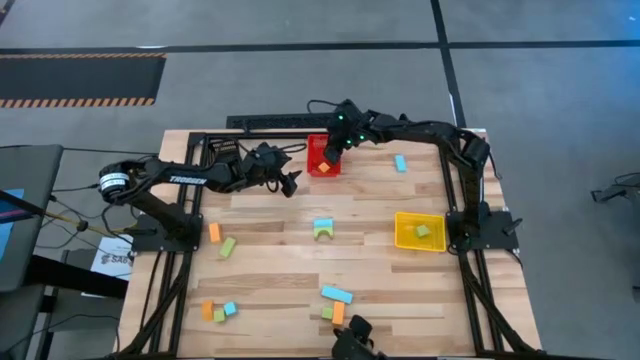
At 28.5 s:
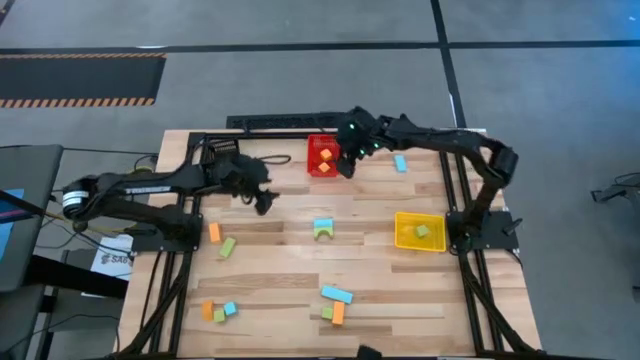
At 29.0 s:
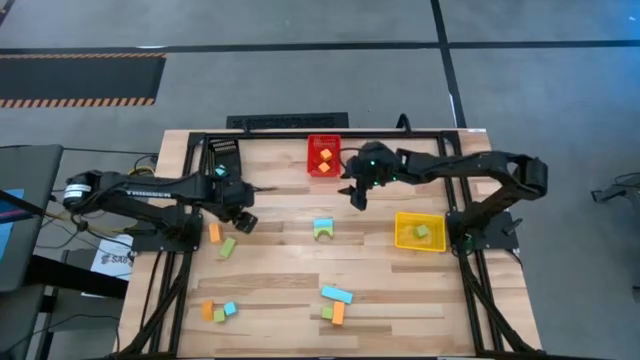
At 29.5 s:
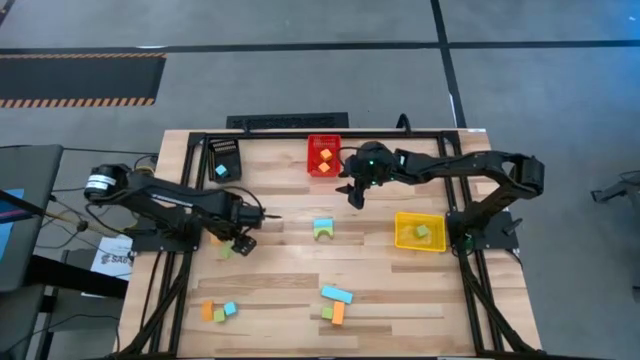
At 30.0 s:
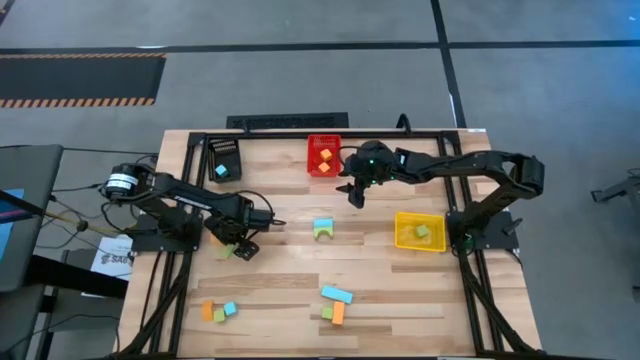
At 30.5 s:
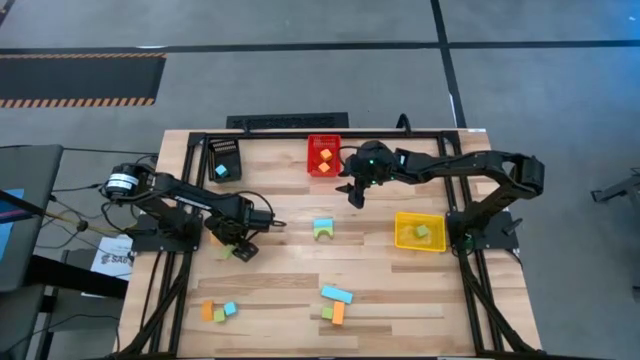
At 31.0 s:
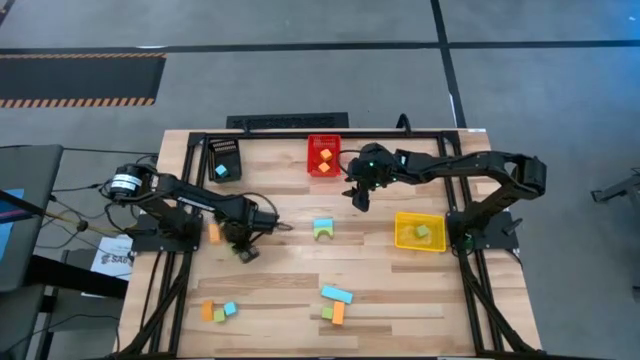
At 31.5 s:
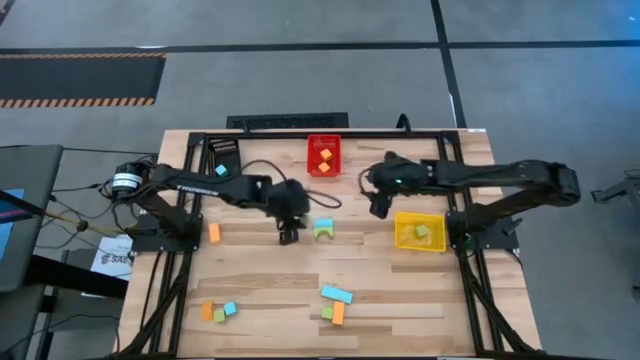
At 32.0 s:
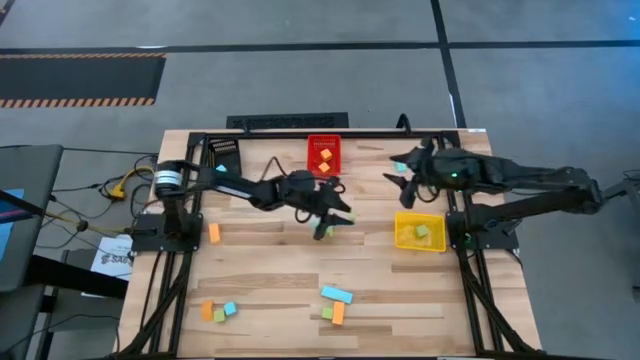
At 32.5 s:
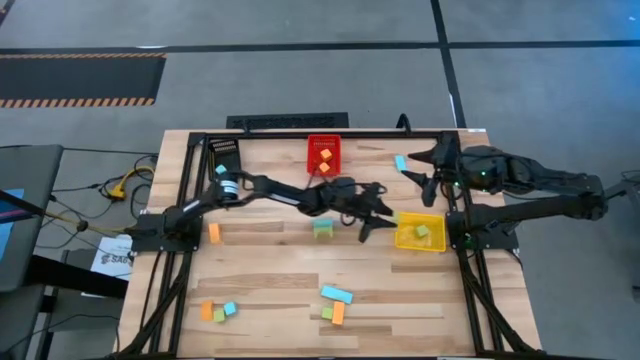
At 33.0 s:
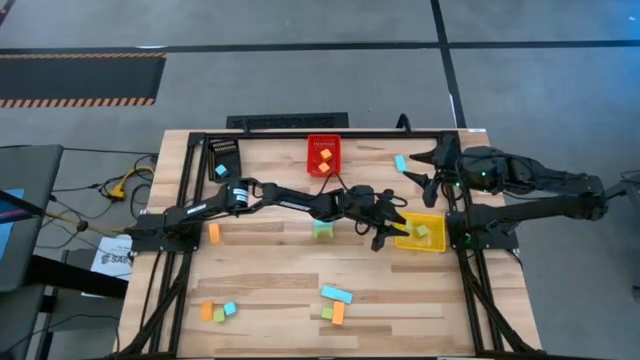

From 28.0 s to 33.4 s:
Task: Sort & place blocks by color
Put the green block into the yellow bin

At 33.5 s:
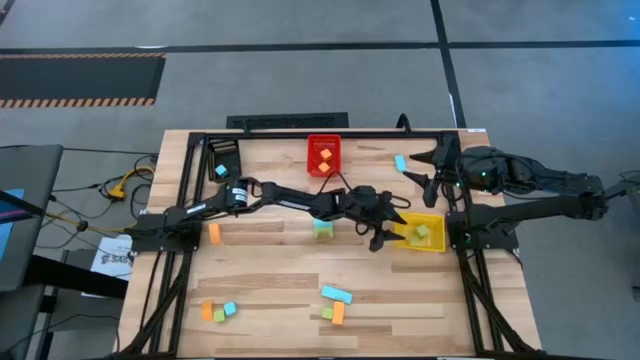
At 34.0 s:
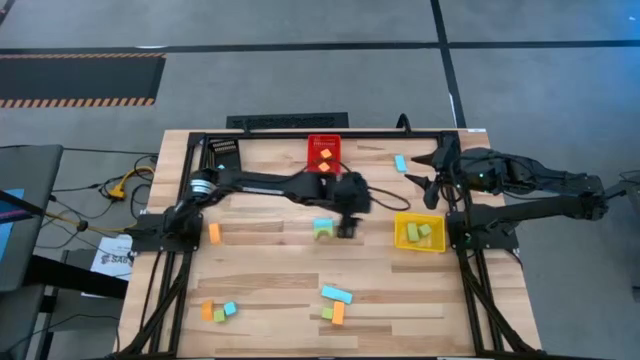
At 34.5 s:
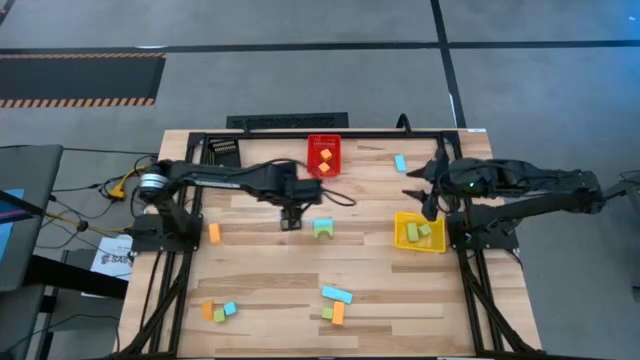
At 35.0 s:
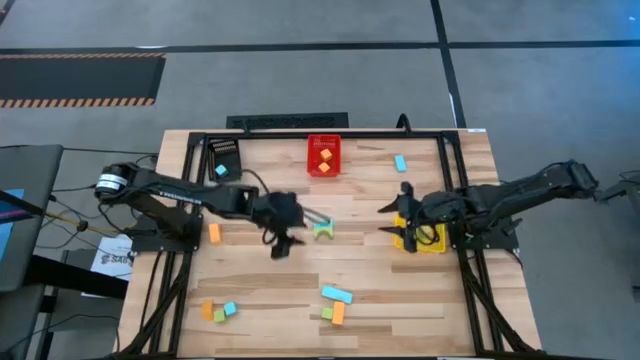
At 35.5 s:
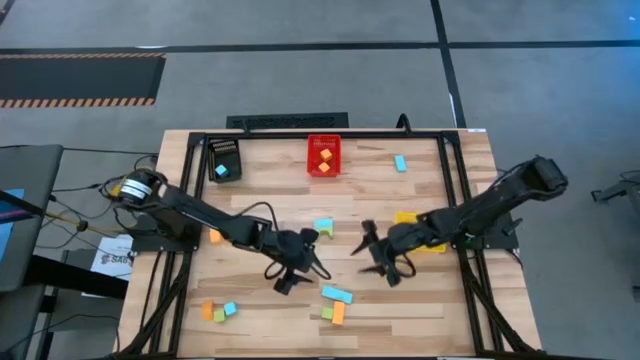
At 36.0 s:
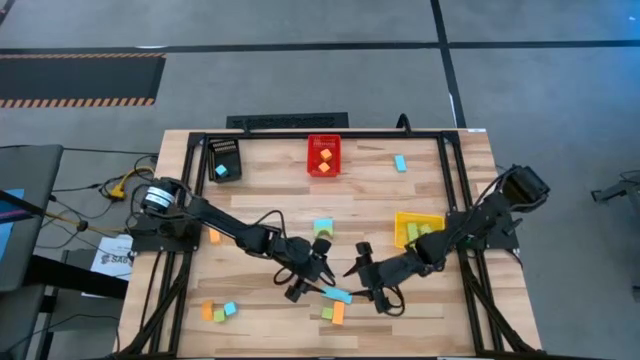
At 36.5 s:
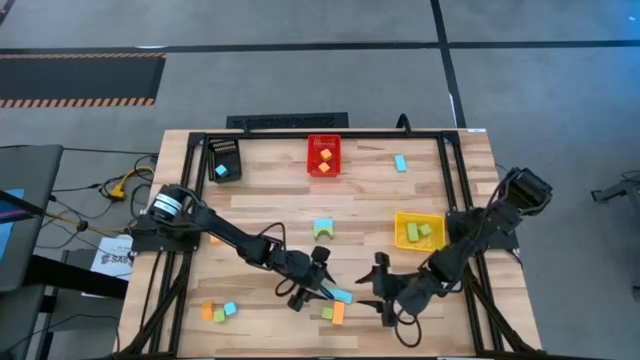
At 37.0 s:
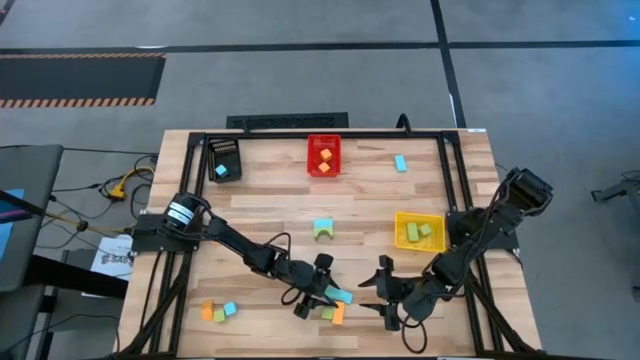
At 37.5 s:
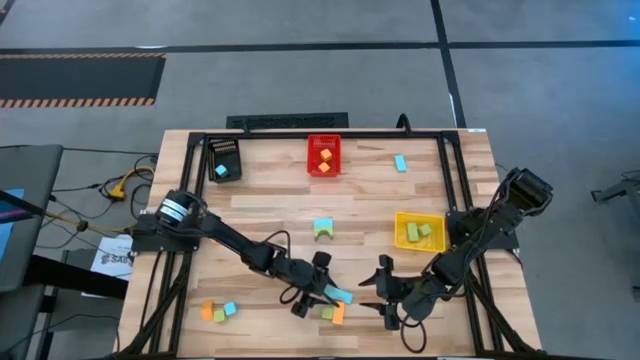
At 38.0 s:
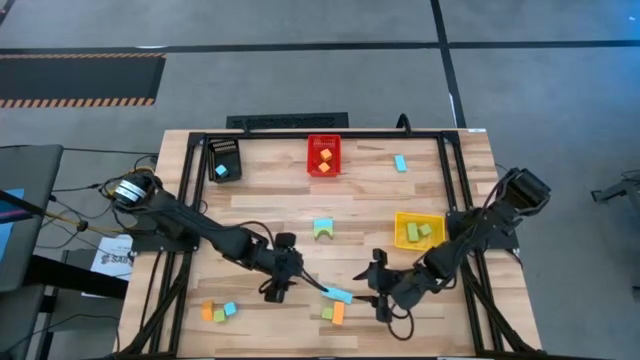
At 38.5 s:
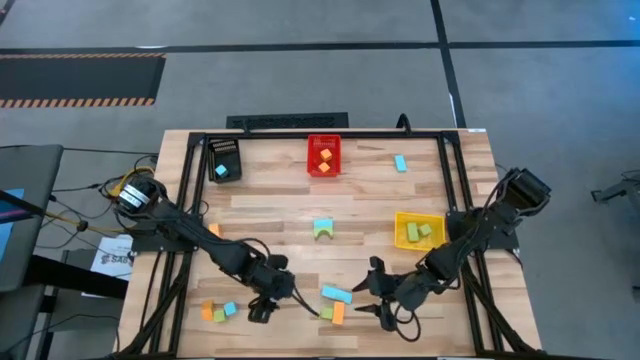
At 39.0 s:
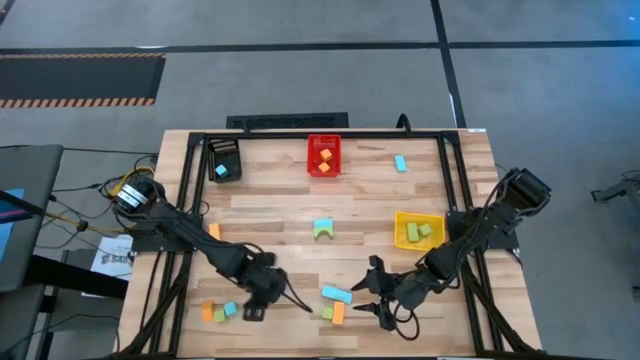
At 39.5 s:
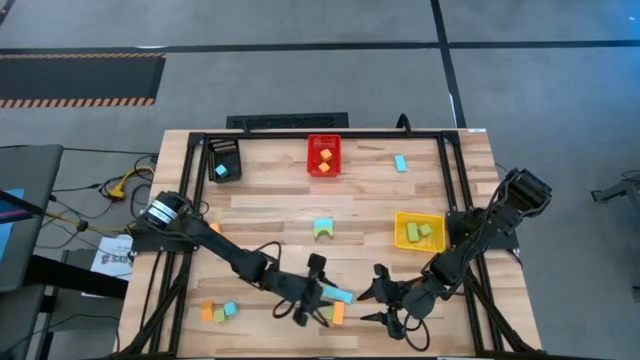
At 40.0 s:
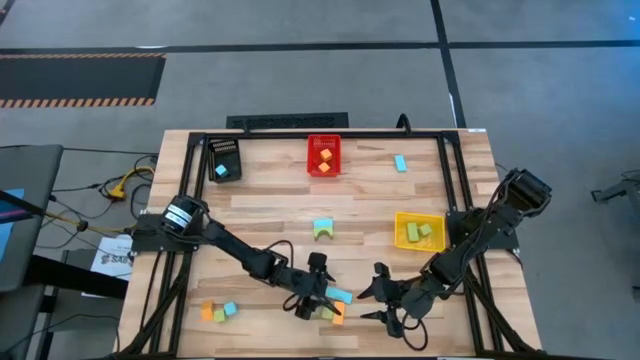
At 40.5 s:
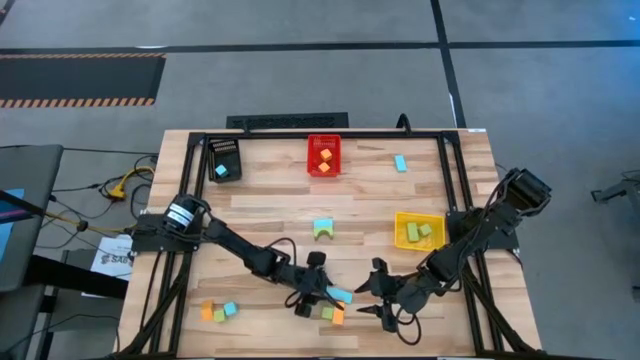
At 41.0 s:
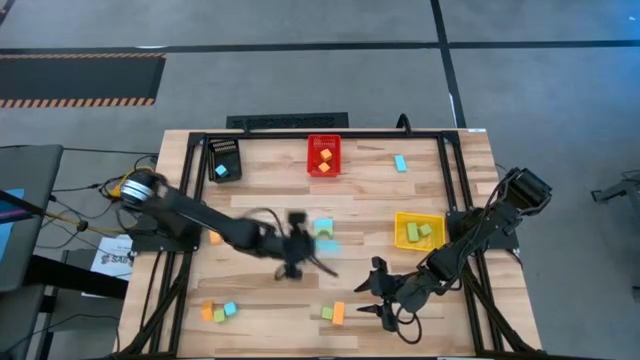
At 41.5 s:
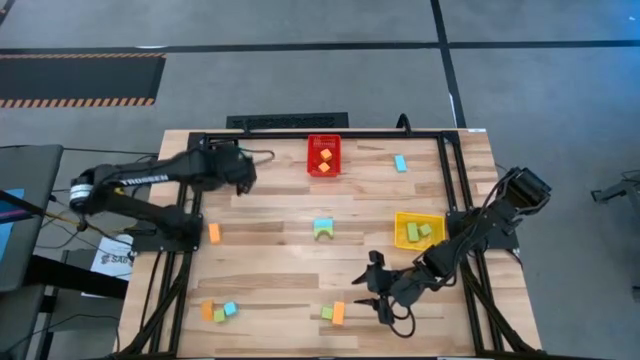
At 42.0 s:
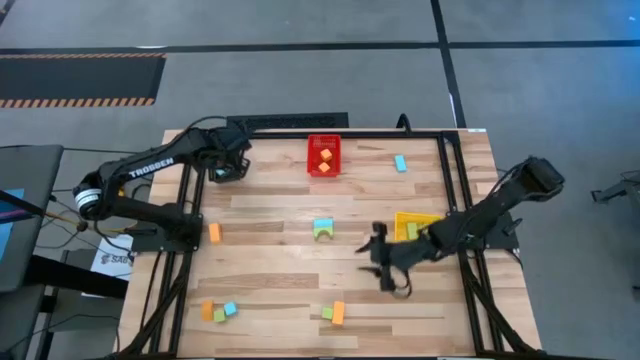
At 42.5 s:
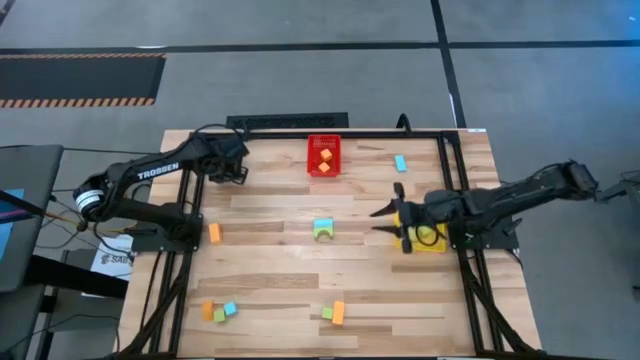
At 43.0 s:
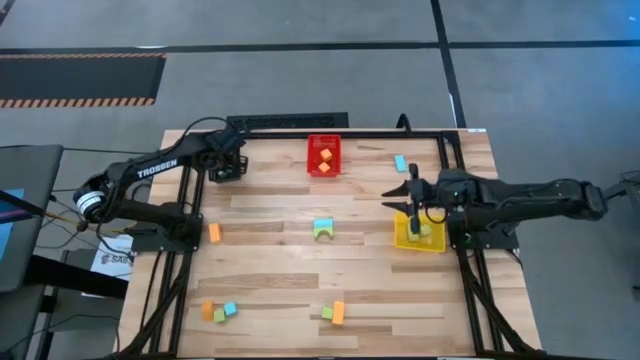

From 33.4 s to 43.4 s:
Put the blue block into the black bin

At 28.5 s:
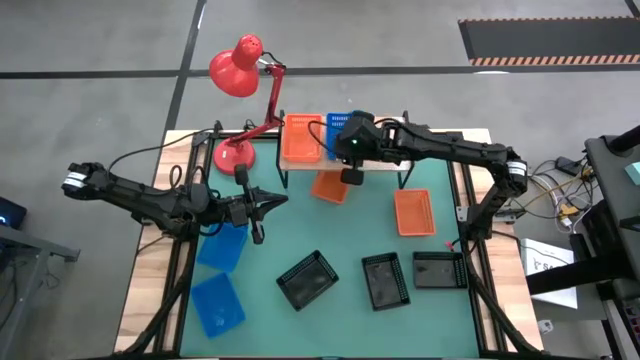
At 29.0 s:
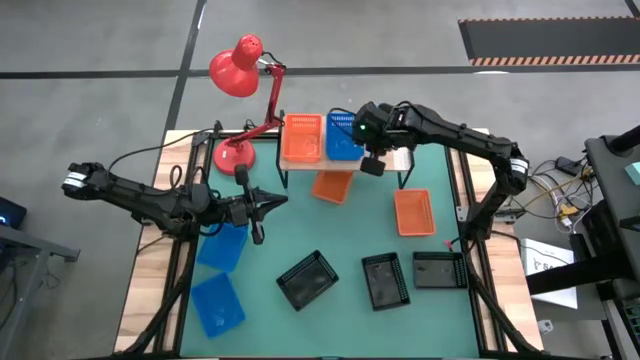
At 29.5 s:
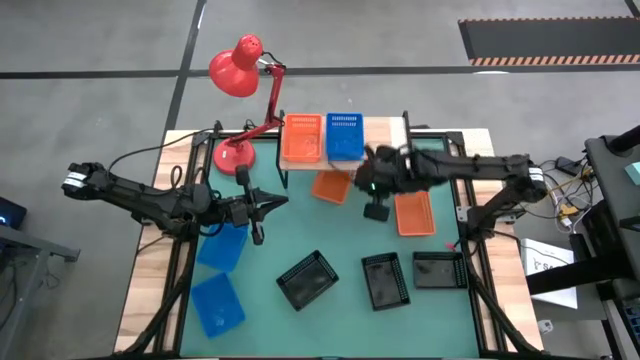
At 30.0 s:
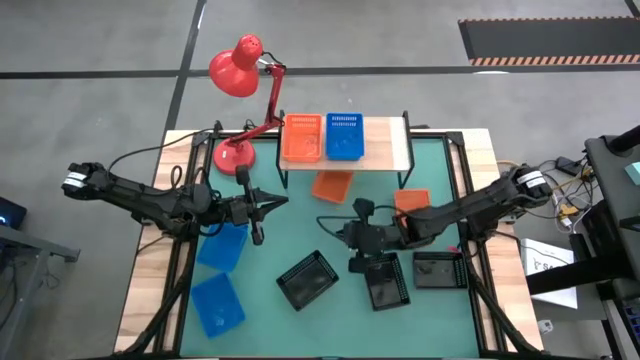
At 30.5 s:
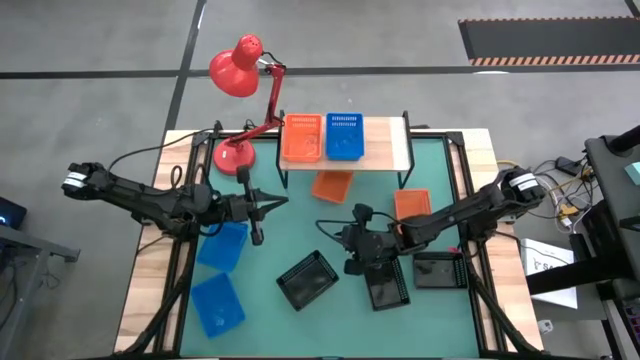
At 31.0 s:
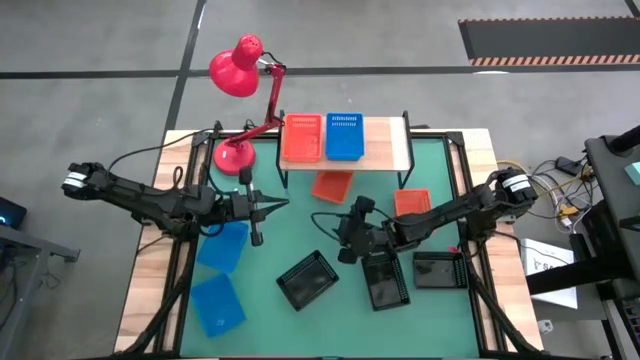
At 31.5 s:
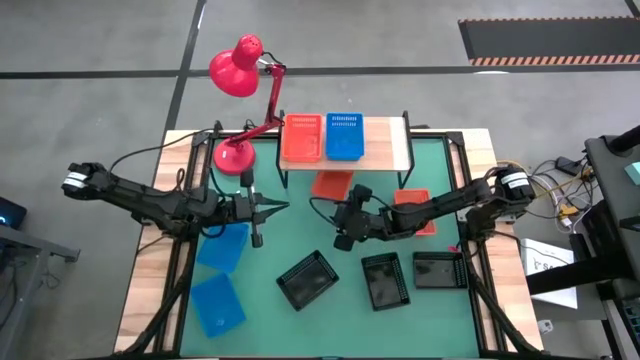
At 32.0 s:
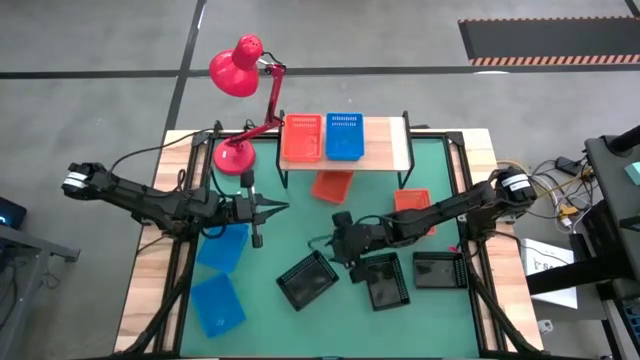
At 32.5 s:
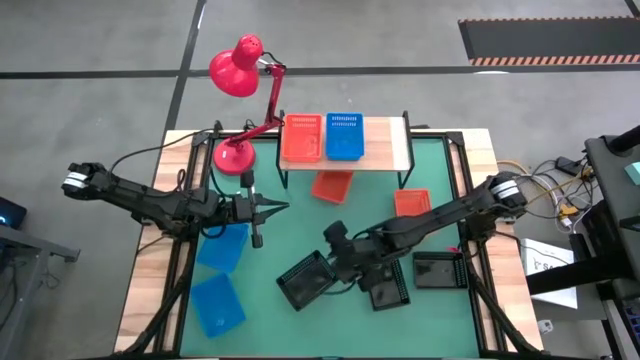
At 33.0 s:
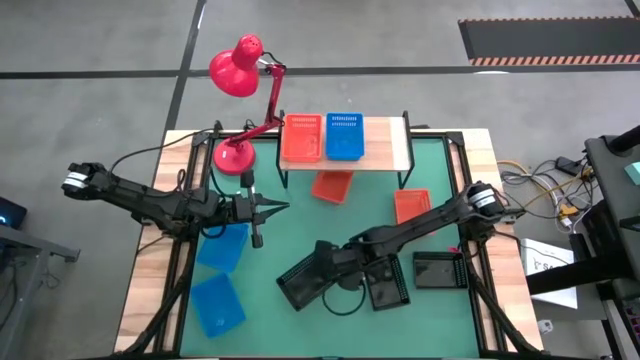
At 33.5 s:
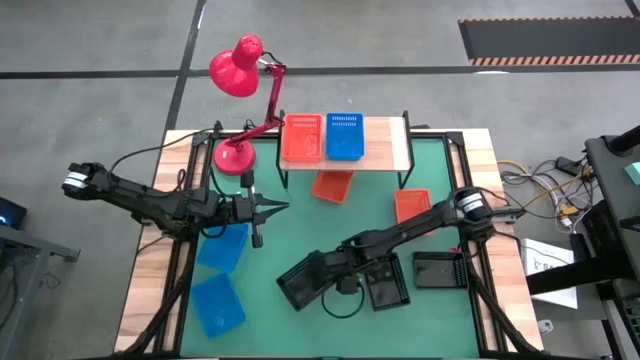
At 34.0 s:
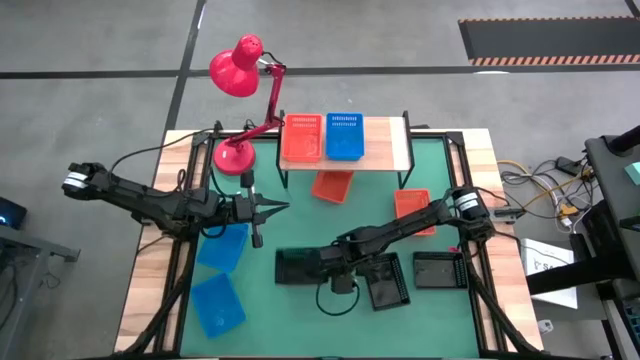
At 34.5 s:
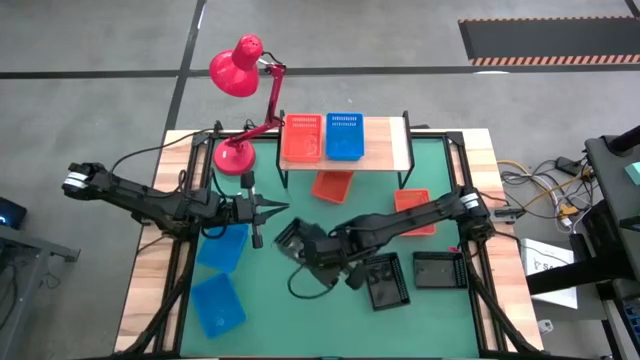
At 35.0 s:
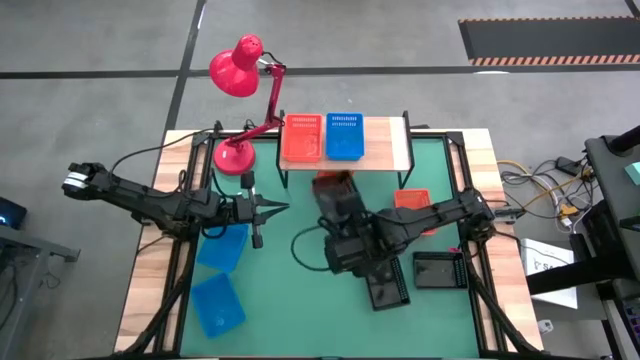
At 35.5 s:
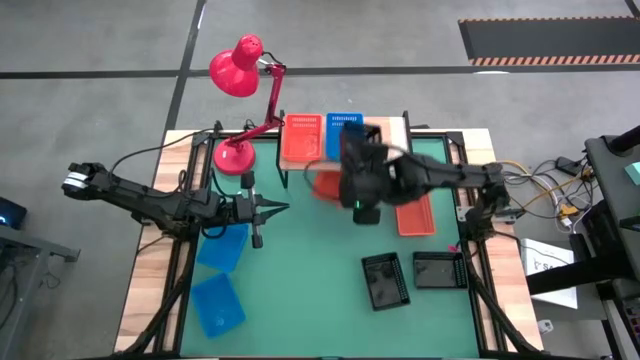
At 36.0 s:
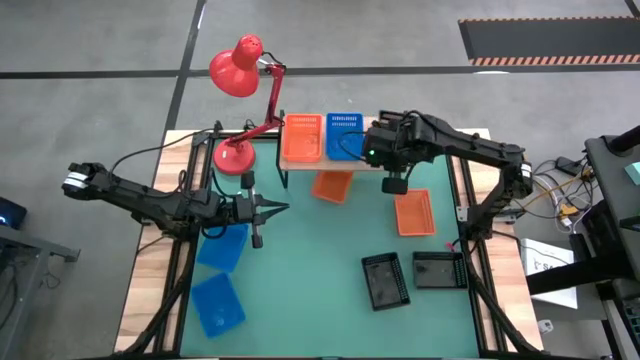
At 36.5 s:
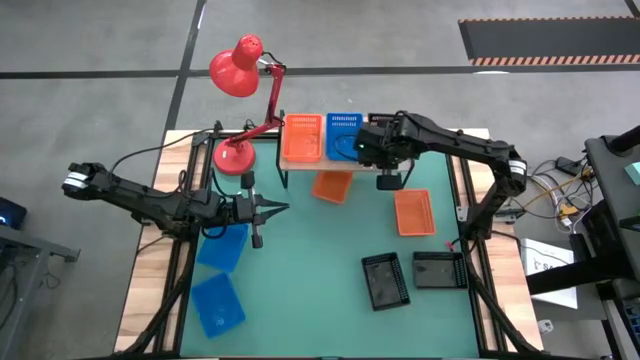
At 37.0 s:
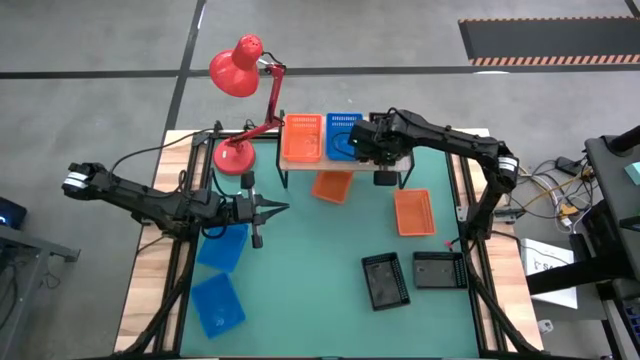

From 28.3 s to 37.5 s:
Task: Stack baskets on shelf by color
Put the left black bin on the shelf
